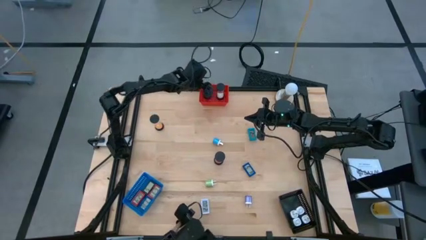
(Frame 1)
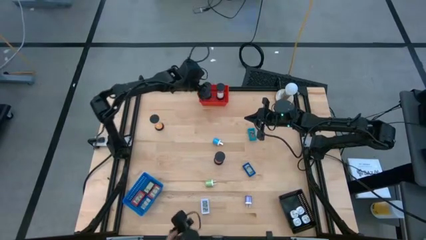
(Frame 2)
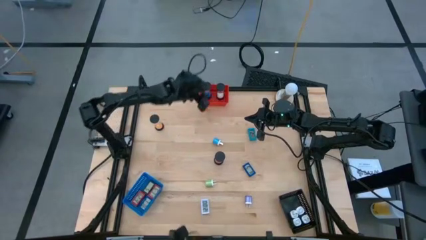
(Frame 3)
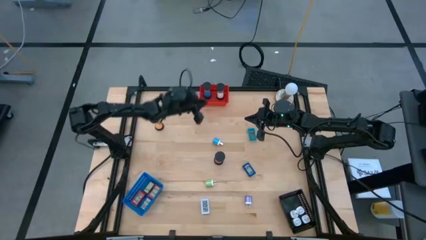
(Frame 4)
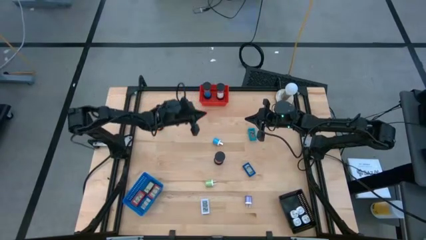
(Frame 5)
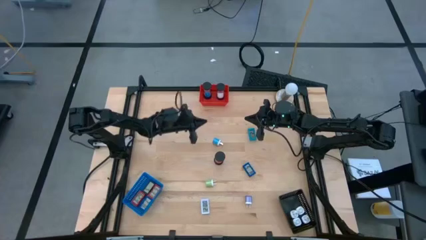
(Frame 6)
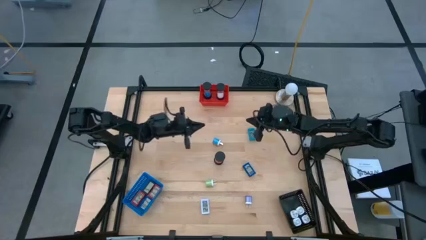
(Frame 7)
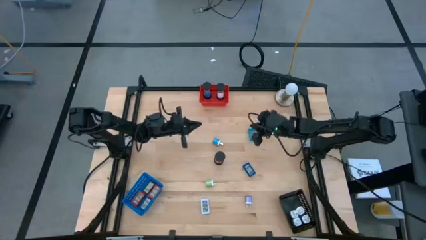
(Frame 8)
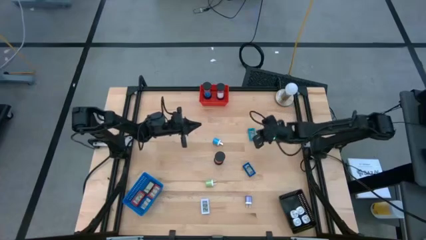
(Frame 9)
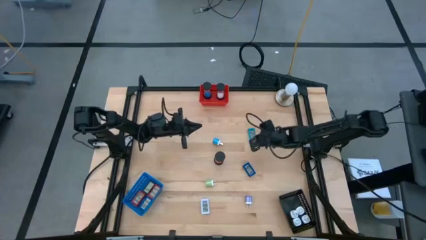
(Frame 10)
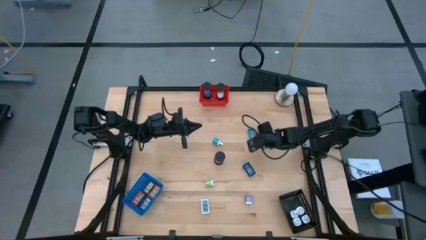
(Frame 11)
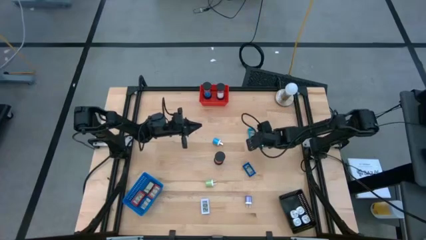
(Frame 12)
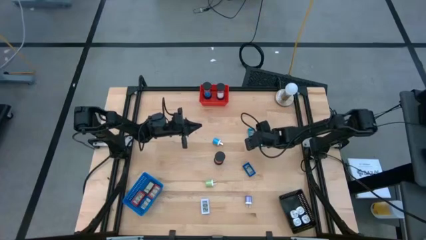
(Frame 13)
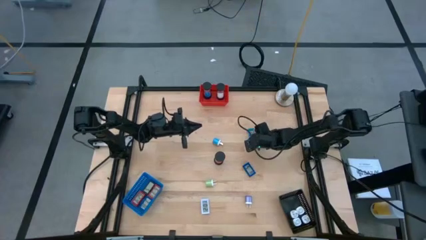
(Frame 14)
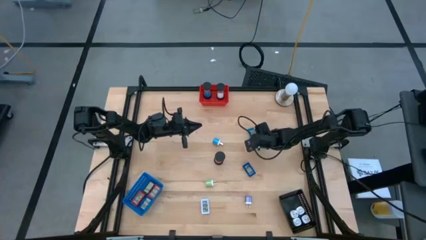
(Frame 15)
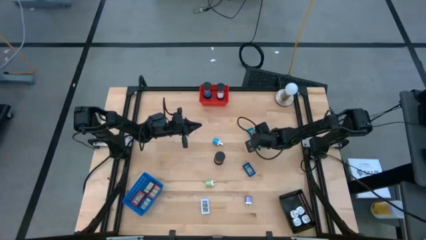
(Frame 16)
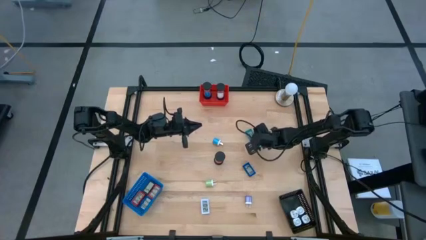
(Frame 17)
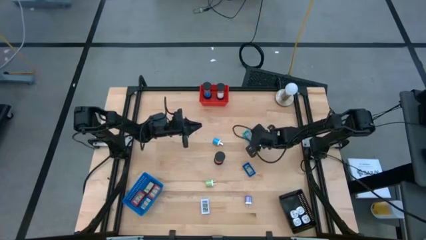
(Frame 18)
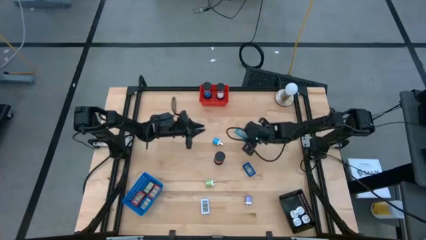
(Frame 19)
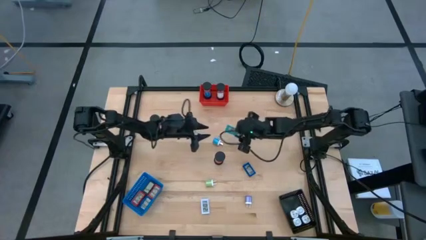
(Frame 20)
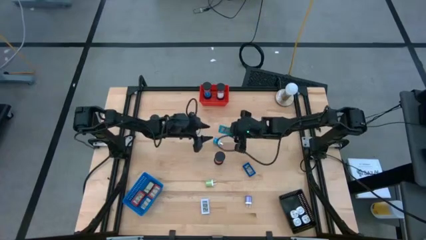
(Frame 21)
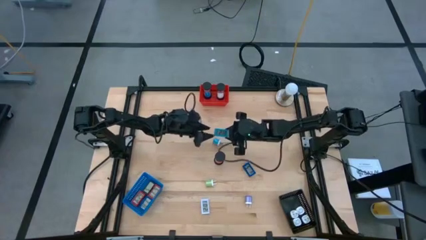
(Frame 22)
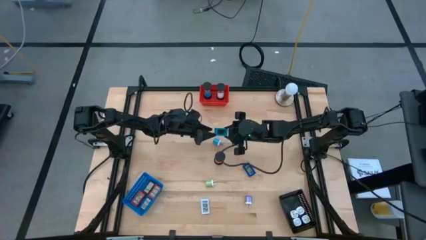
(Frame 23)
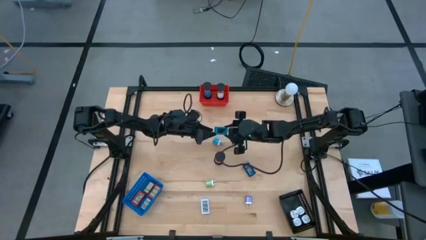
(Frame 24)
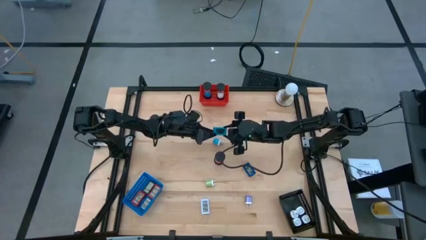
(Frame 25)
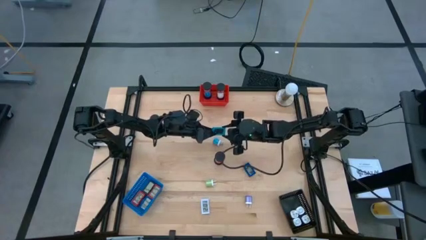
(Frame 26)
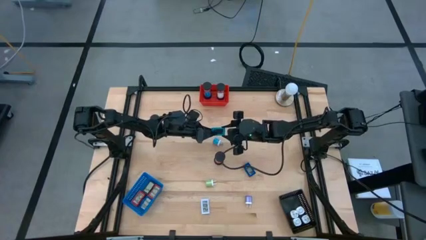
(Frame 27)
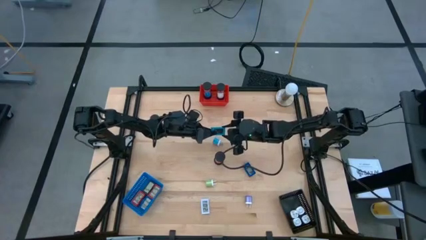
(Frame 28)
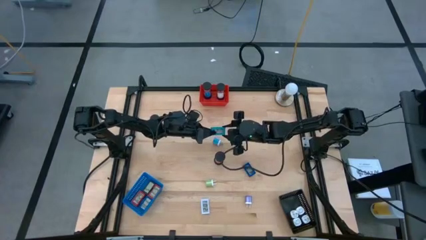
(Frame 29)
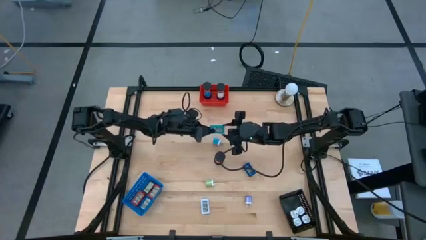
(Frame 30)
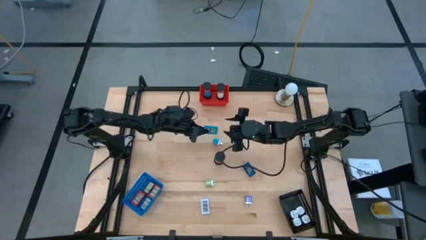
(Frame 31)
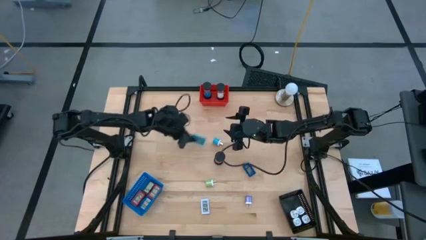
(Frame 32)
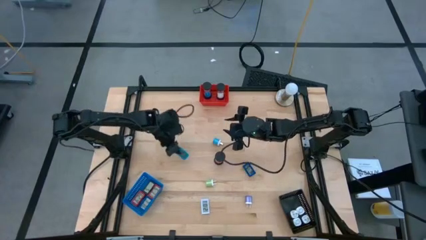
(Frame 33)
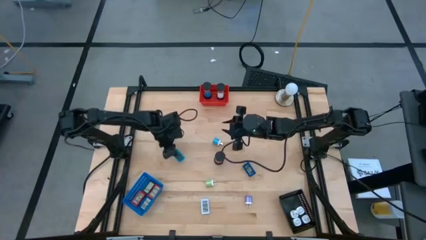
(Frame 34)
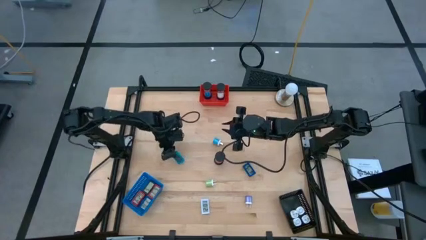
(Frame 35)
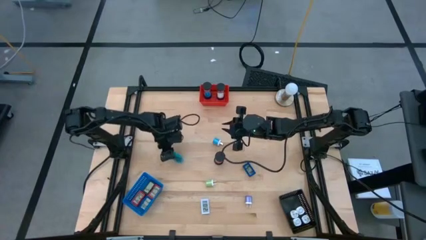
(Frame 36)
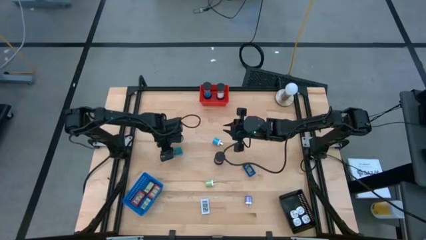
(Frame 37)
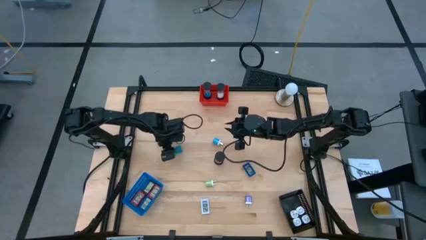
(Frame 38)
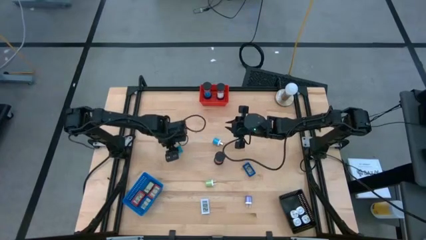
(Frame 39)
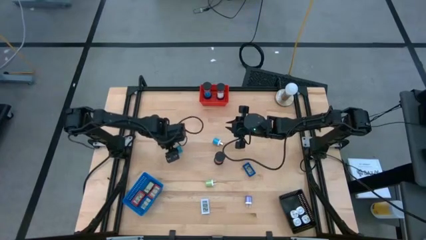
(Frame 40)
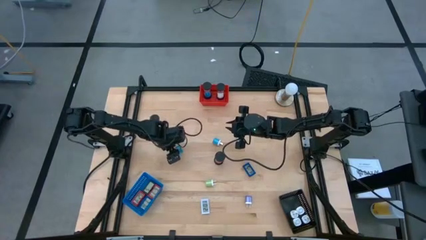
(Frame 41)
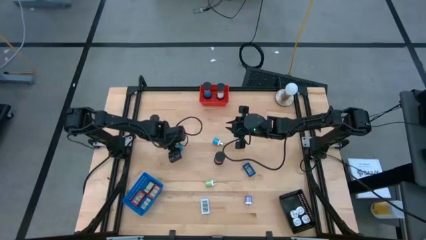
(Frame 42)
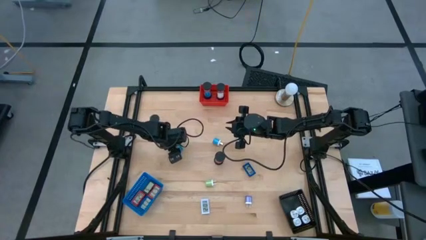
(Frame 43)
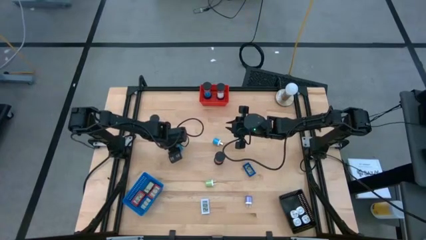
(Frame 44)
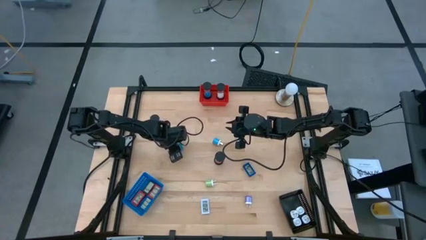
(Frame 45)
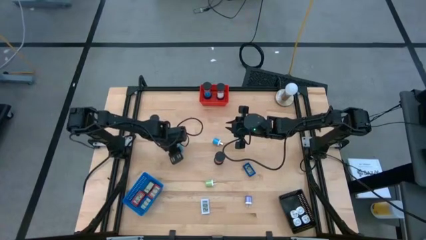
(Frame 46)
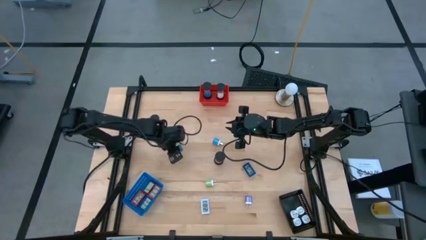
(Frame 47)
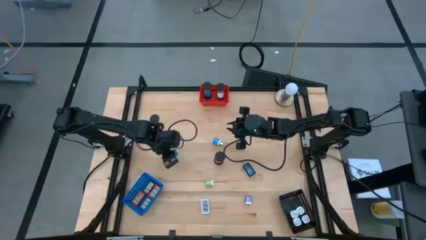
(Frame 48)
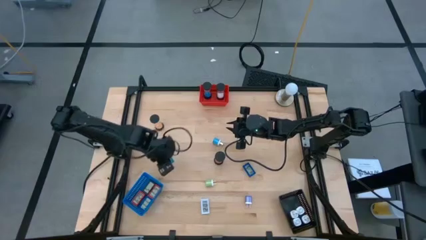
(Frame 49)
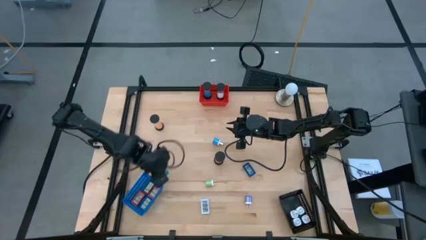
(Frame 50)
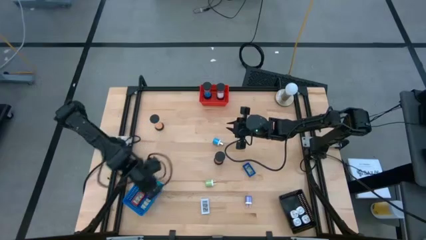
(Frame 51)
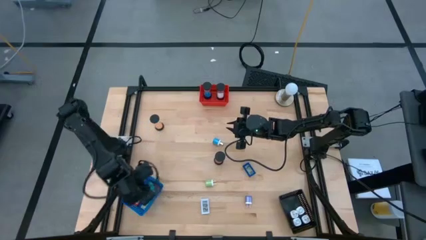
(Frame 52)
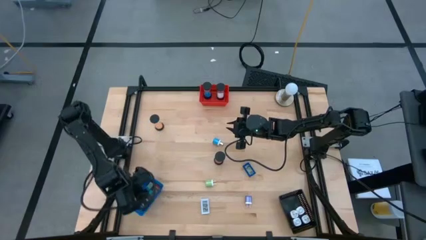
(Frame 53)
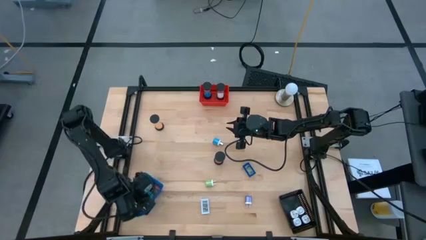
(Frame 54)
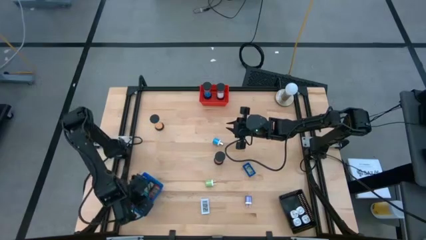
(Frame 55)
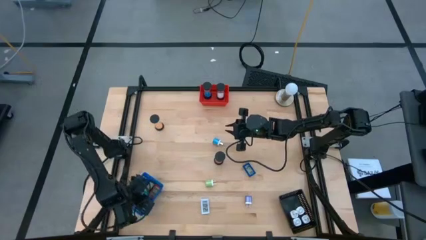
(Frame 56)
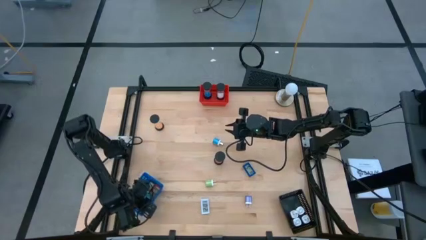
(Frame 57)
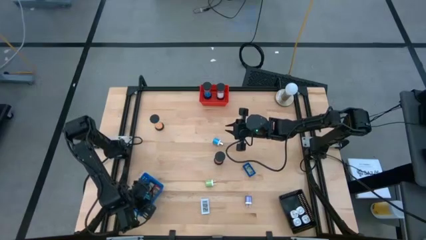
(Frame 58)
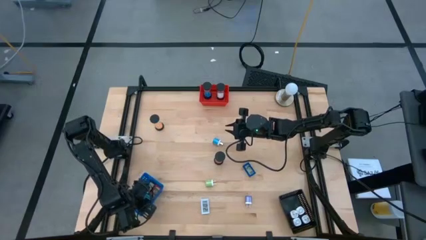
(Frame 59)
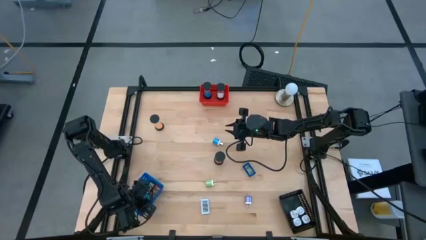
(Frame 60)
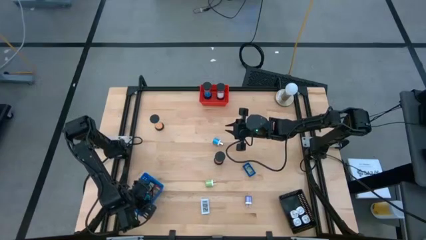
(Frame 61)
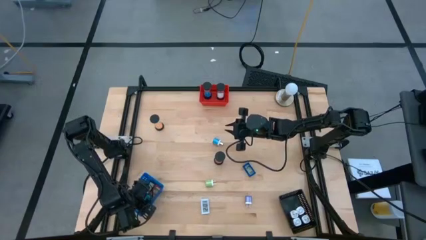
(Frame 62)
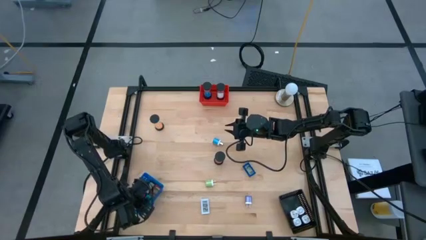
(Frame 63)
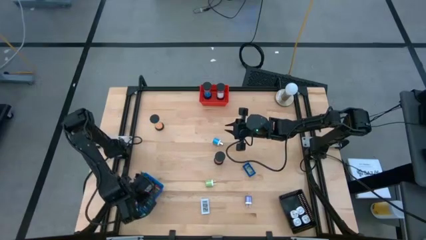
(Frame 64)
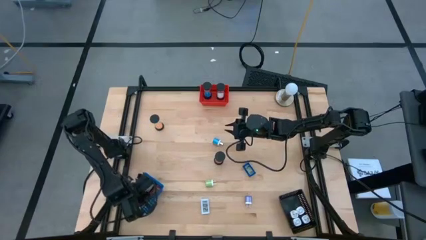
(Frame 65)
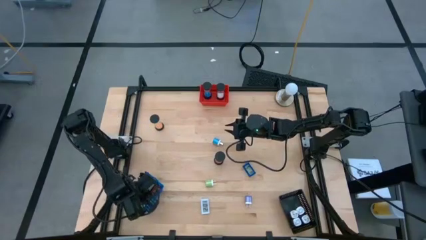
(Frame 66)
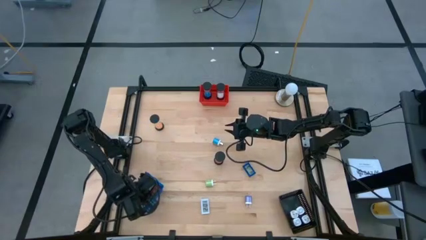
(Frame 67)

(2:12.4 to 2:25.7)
Task: Pick & Place Office items
Put the light blue digital timer into the blue bin
